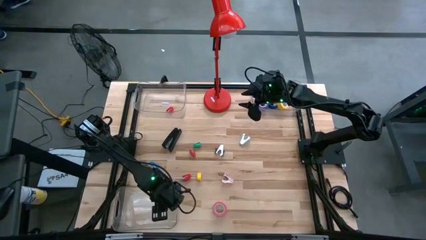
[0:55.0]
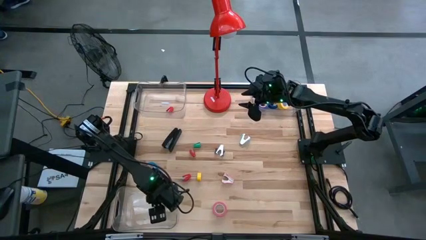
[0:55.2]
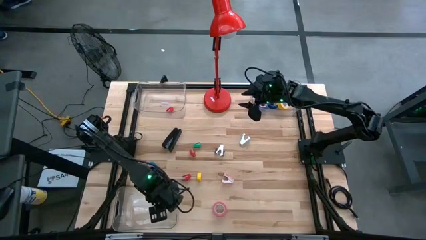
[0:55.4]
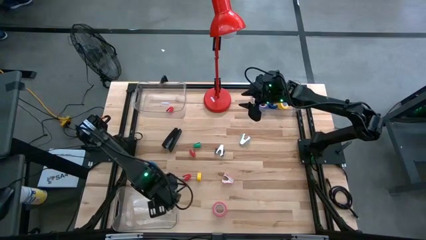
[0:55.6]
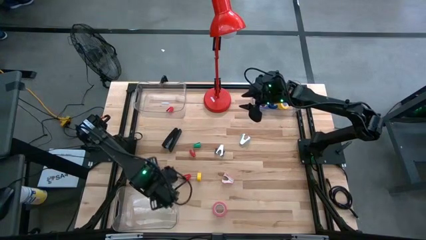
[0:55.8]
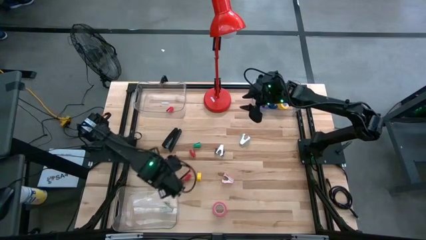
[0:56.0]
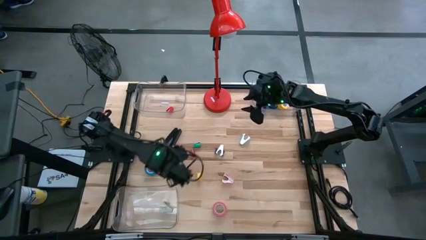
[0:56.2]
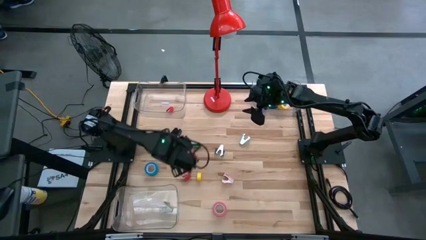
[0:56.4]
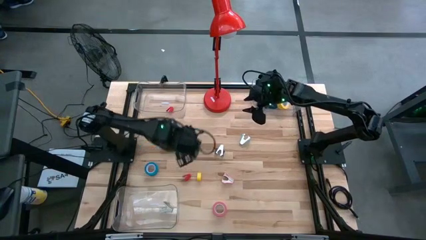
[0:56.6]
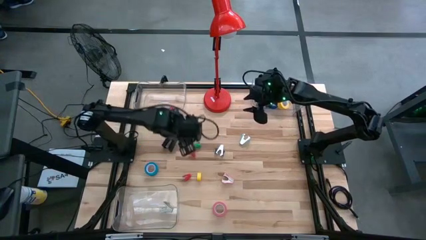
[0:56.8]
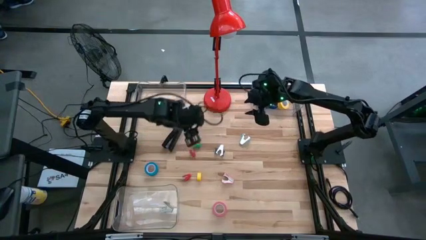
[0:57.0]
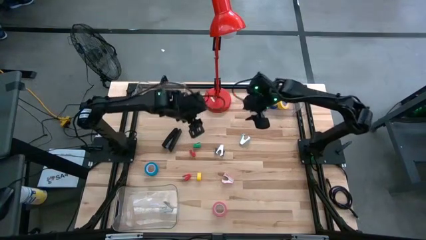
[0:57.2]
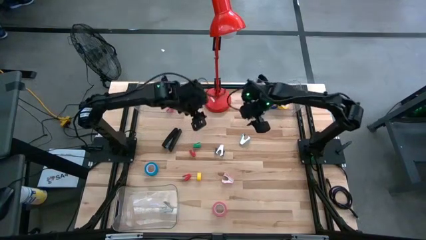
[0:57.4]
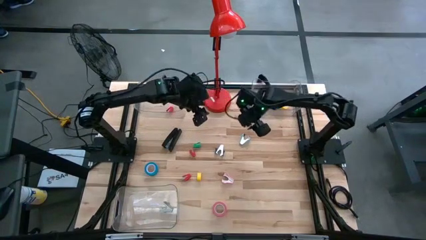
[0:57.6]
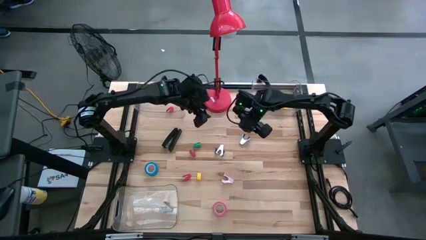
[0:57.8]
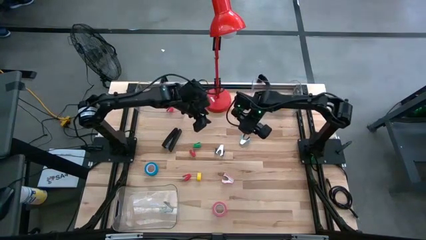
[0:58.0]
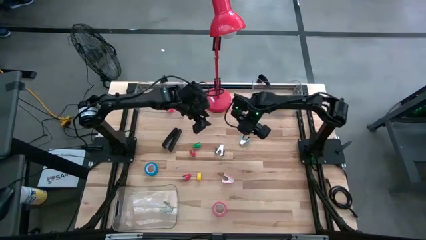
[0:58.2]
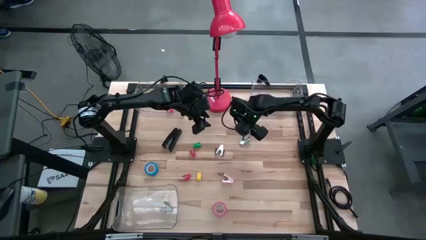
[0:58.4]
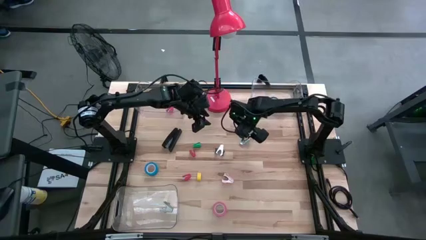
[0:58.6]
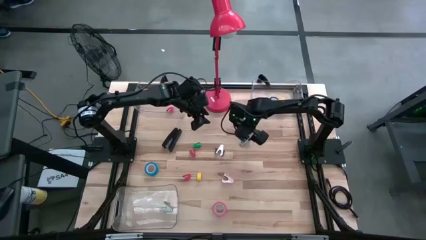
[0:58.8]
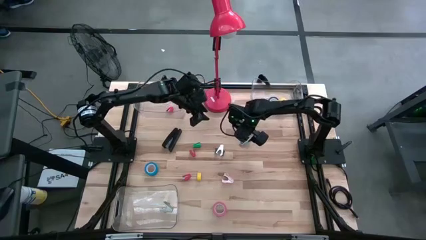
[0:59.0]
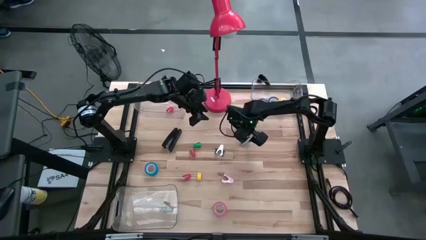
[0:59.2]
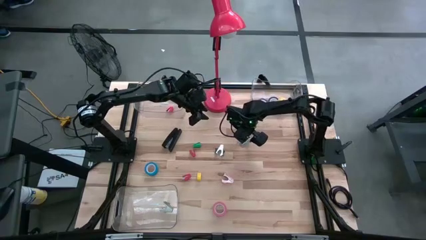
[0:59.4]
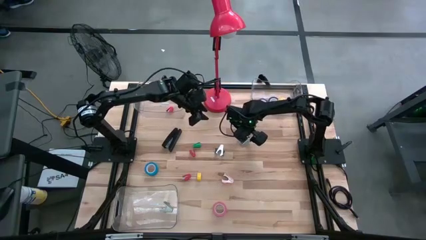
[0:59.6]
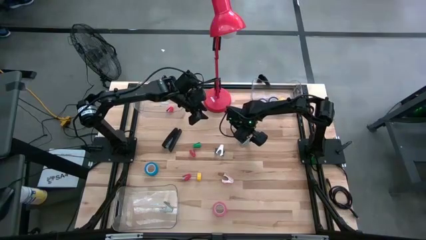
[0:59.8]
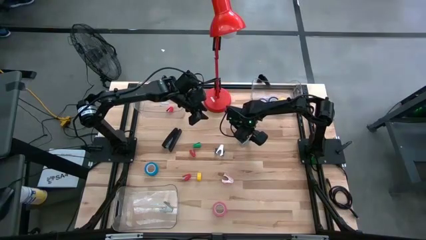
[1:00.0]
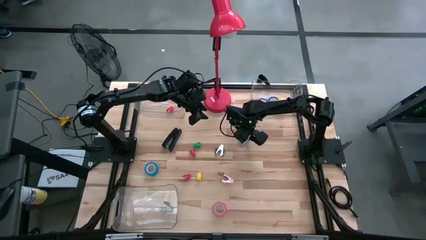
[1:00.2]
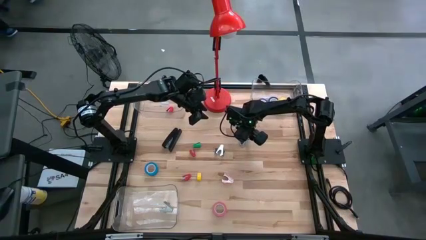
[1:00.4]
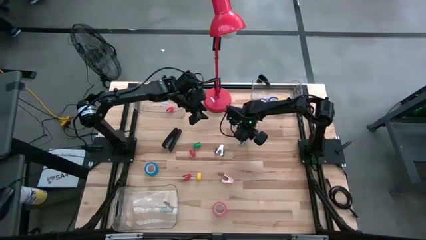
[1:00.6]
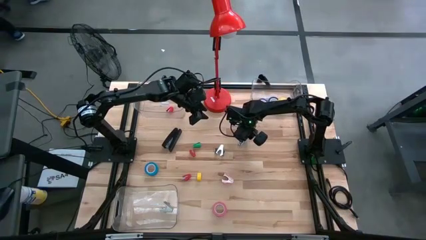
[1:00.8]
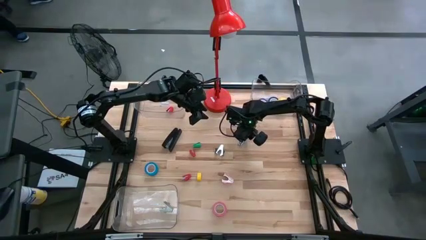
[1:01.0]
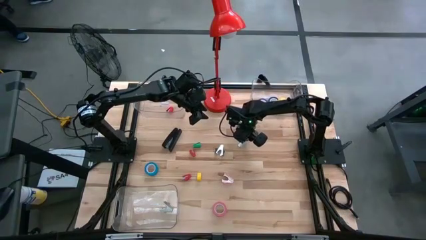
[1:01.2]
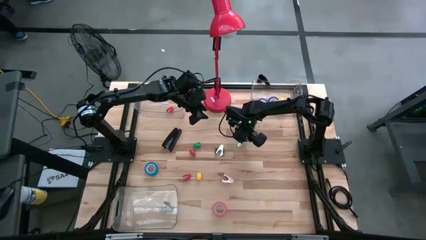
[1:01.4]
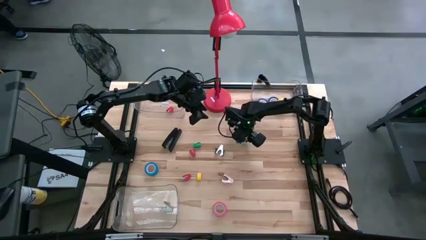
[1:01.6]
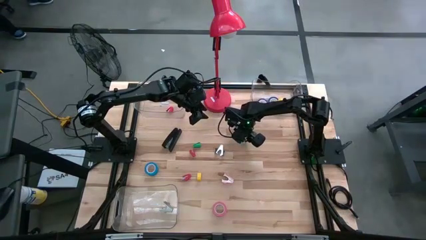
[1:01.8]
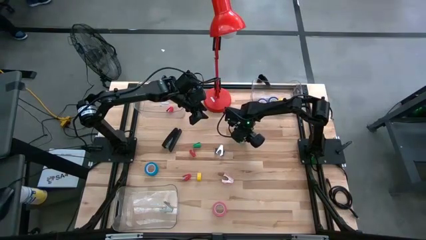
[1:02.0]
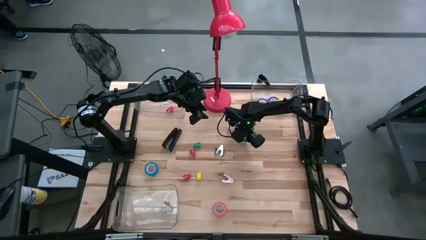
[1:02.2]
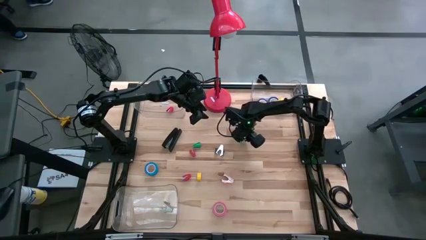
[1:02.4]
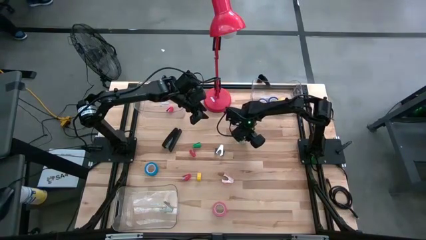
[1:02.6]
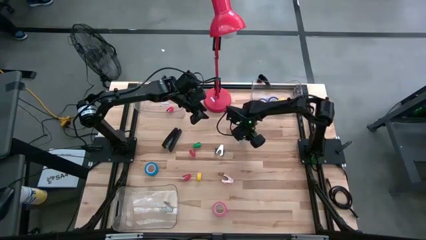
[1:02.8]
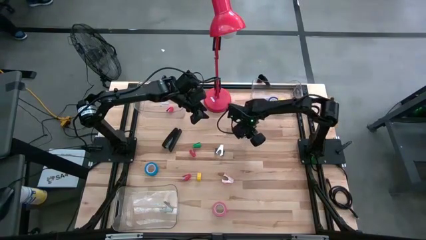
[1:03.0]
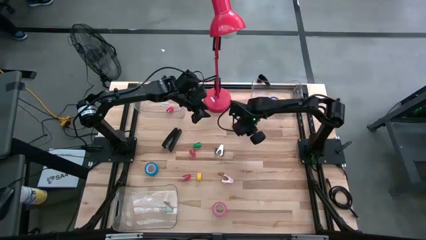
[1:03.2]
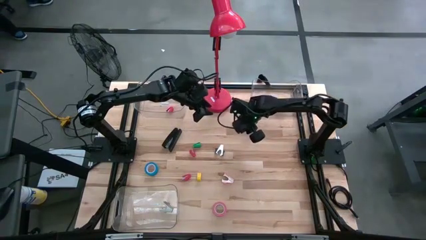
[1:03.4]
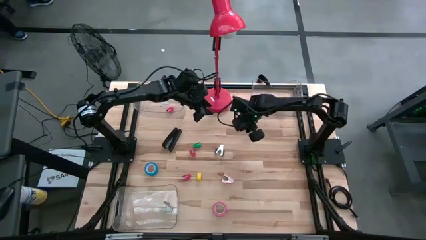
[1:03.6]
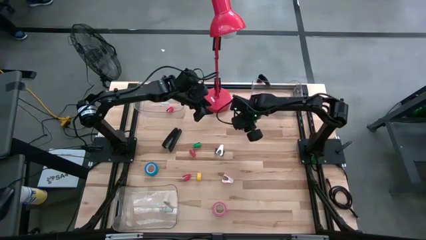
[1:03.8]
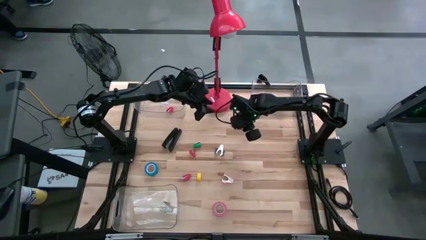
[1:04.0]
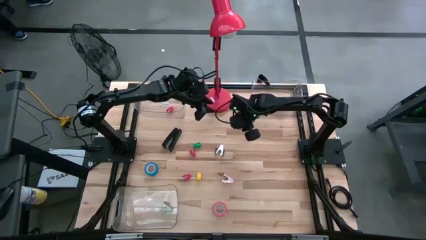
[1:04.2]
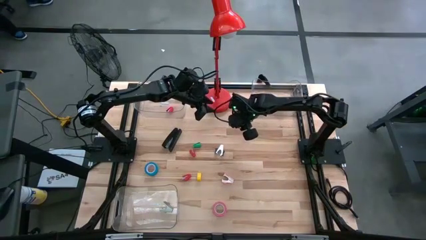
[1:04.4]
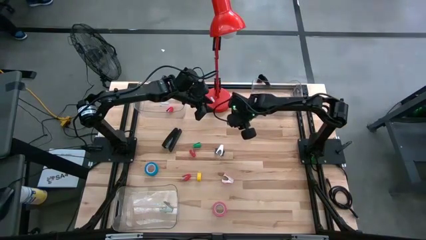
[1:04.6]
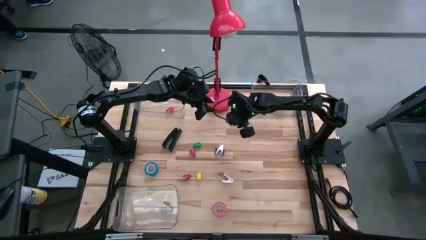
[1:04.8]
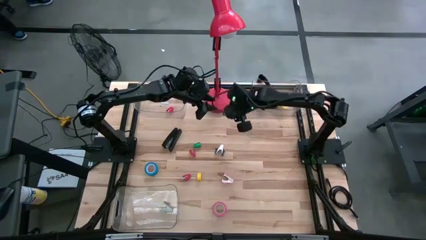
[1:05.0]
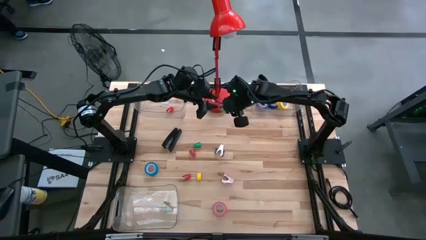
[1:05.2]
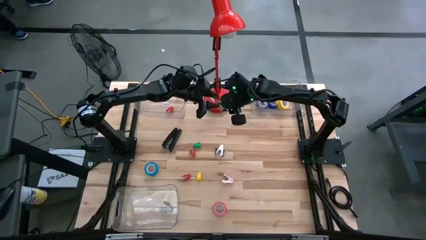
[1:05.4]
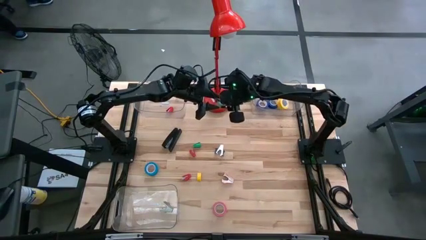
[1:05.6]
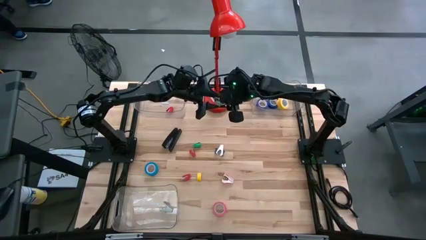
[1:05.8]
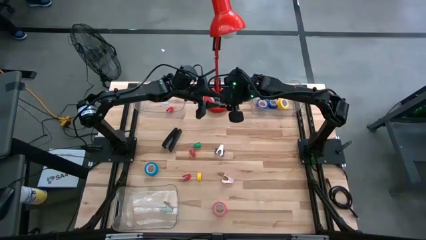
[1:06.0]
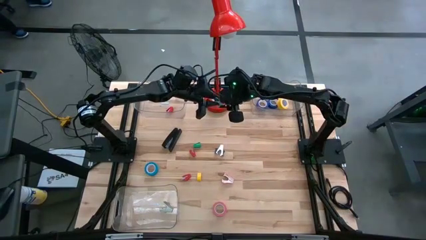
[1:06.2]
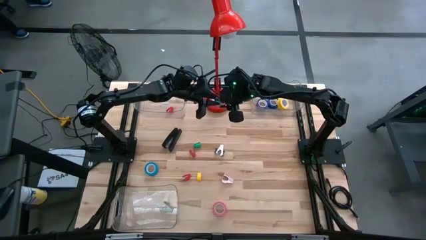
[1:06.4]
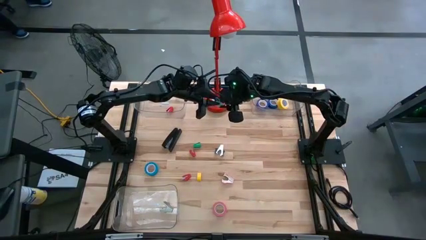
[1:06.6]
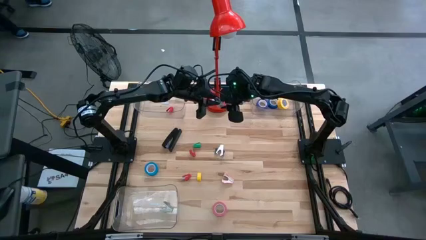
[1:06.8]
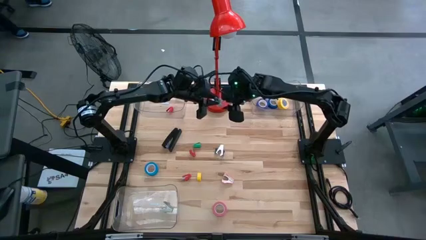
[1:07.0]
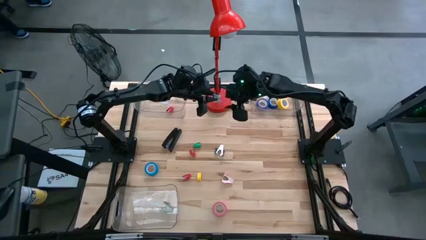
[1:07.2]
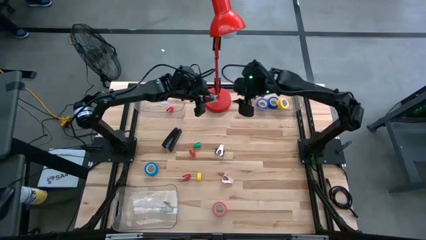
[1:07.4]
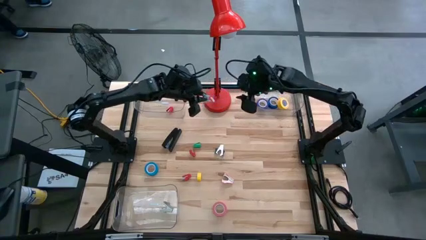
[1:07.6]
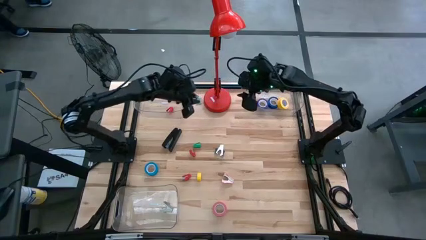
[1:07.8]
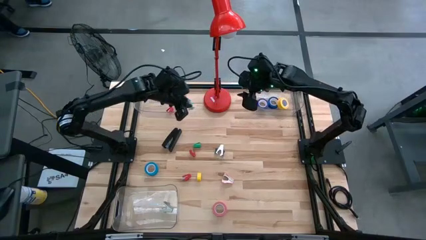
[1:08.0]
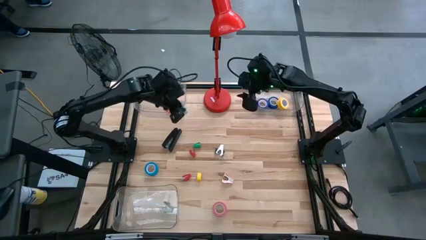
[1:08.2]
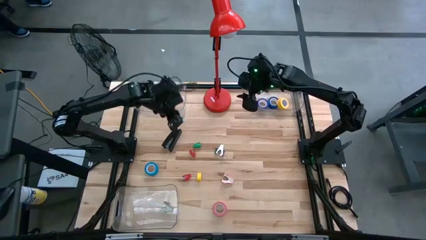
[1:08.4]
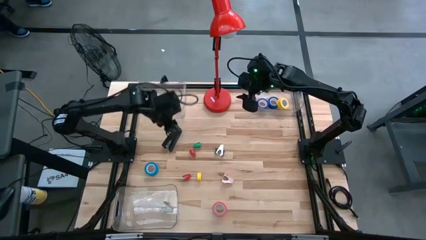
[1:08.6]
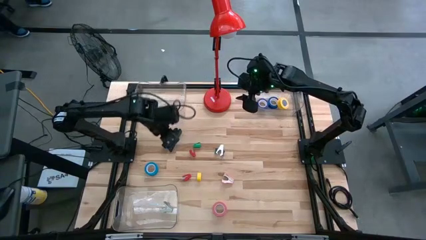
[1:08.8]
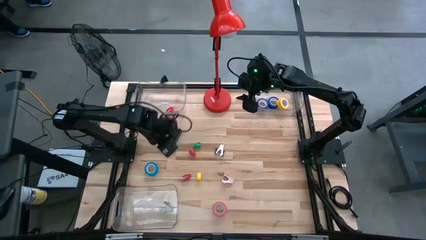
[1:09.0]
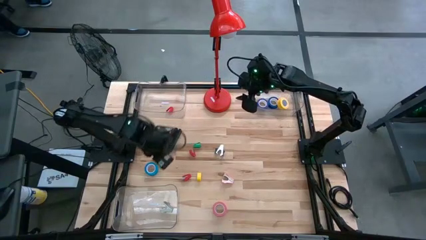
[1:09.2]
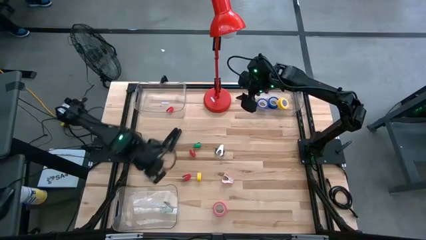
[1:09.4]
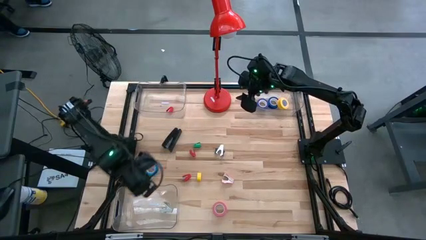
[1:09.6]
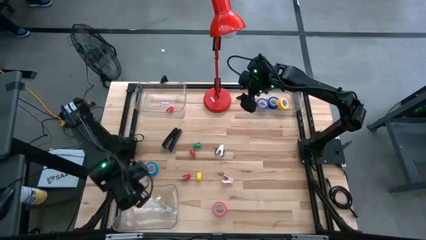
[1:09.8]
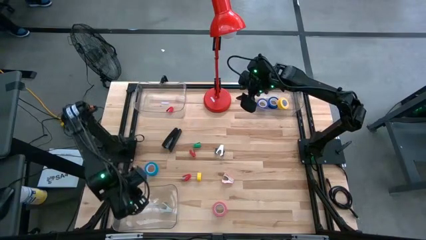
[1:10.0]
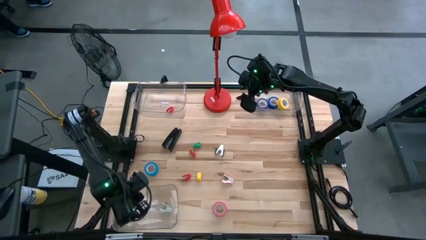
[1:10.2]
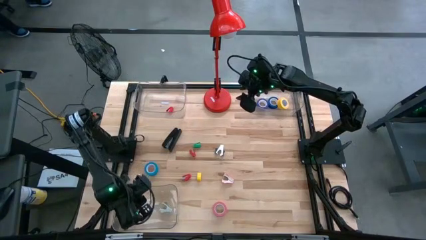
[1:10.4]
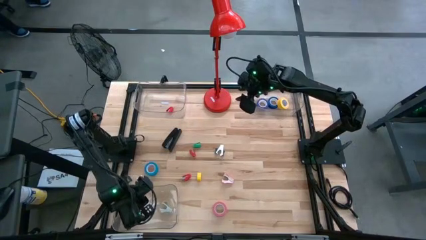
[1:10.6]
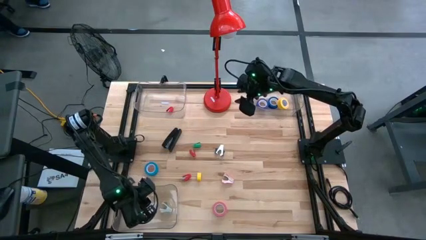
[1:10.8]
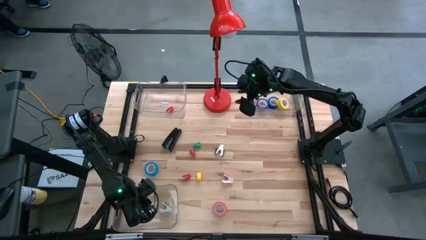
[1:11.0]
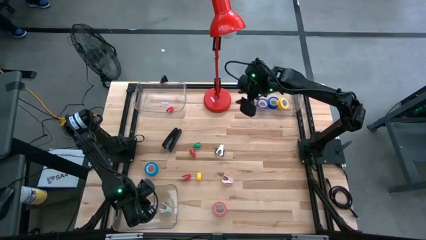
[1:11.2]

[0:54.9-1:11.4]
Task: Pick and place Stapler, Stapler remover, tape
Put the light blue stapler remover into the bottom transparent bin
